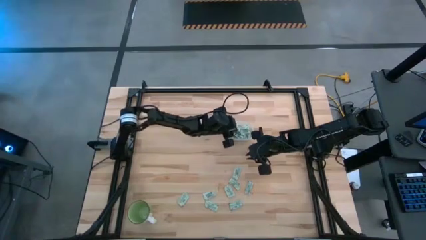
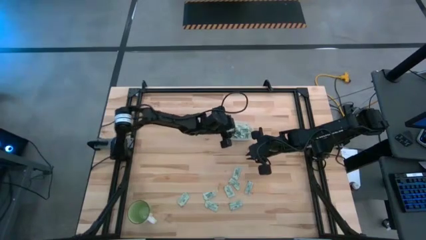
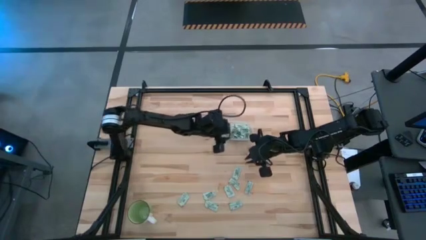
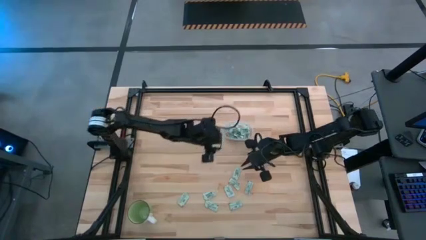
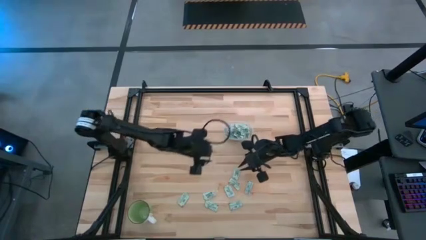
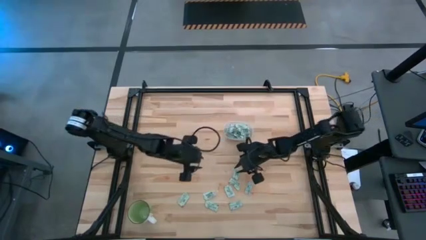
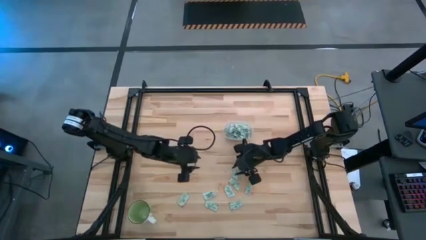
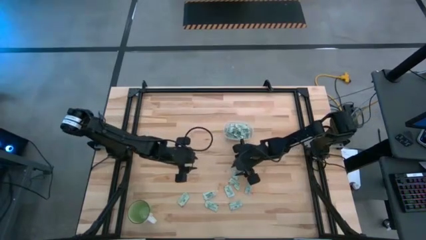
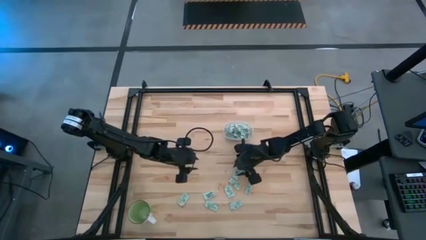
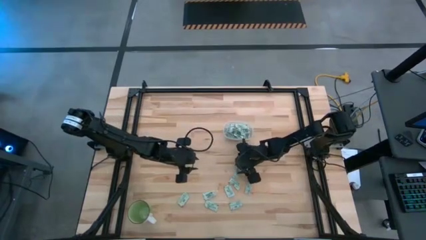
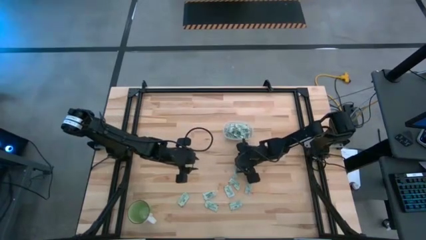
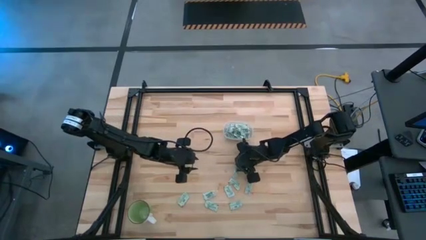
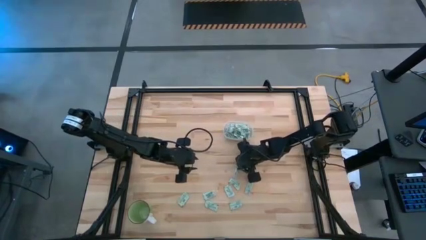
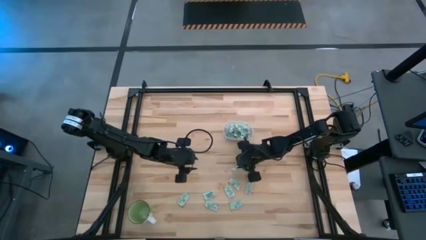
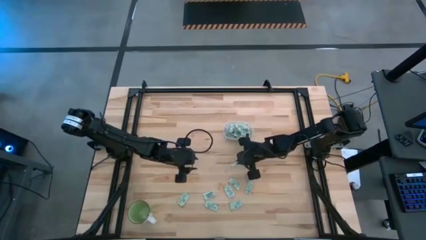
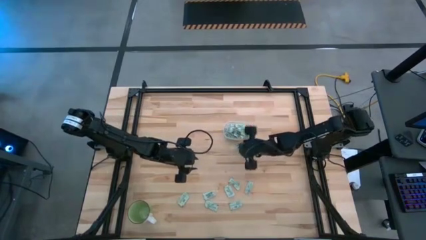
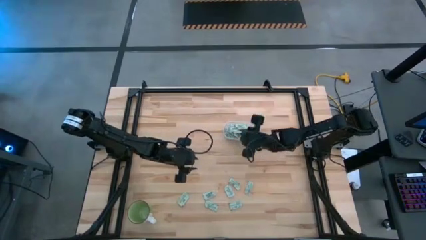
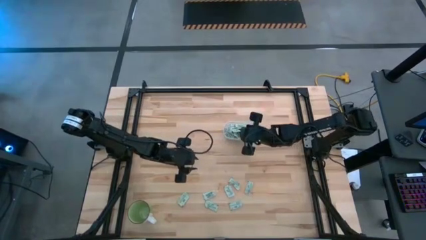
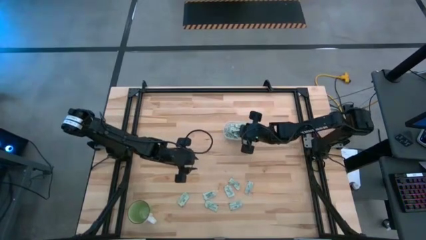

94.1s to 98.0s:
Task: Pick and place Stevia / Truvia into bins
Put the stevia packet into the transparent bin

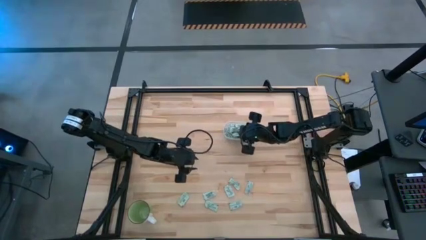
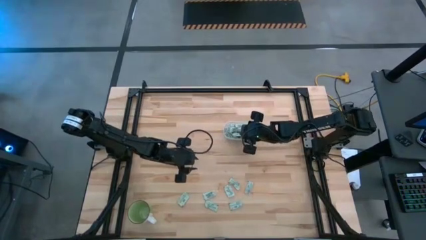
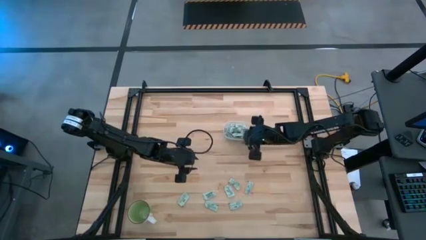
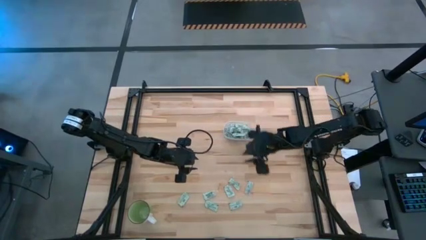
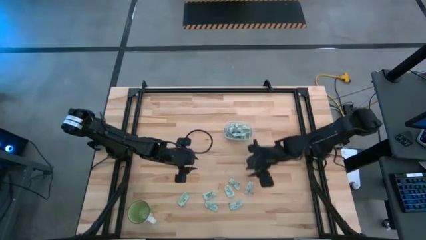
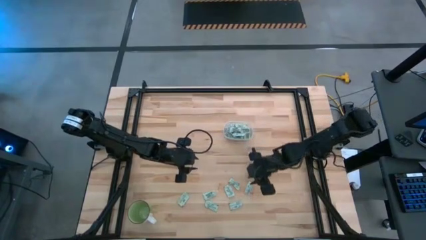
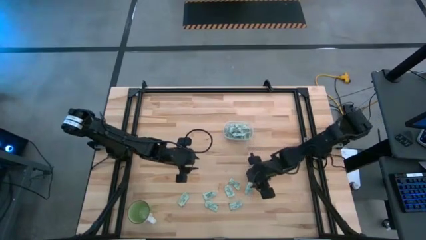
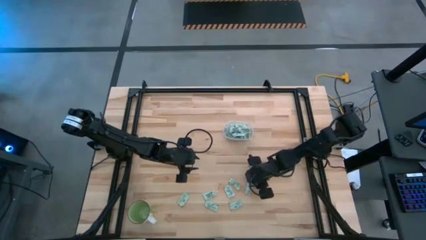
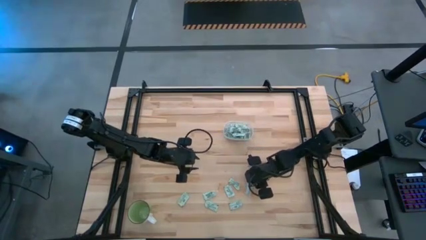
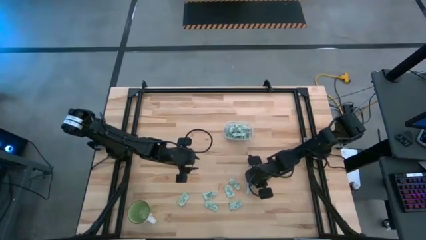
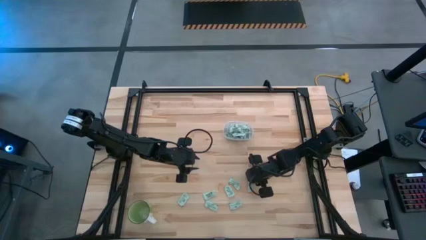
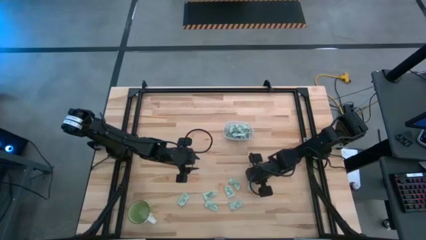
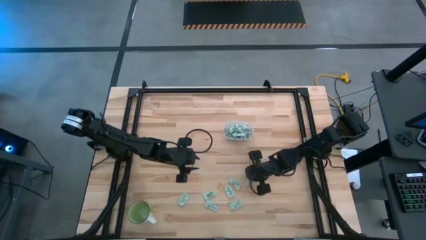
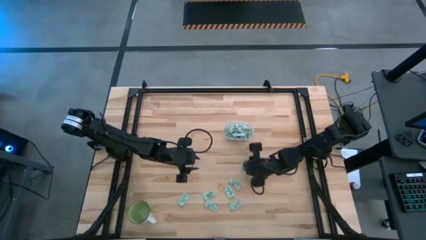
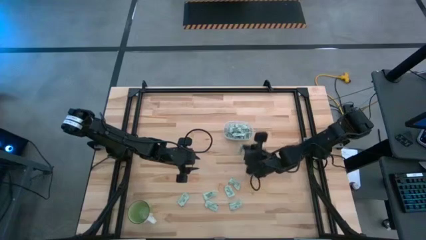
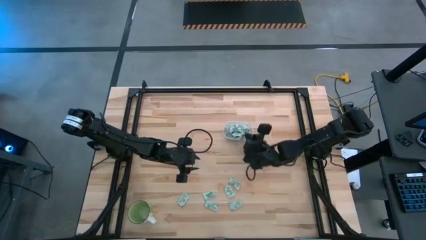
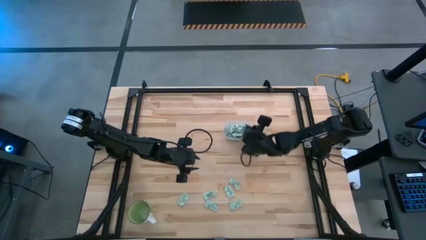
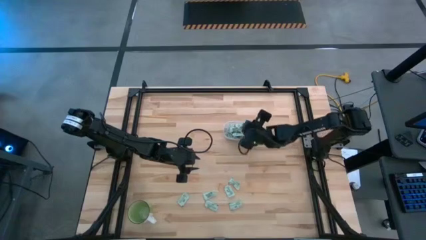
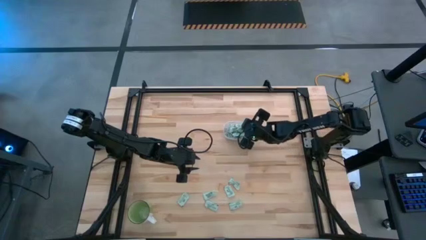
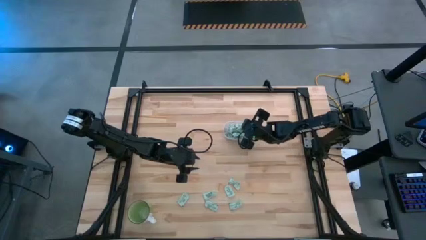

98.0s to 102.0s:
Put the stevia packet into the transparent bin

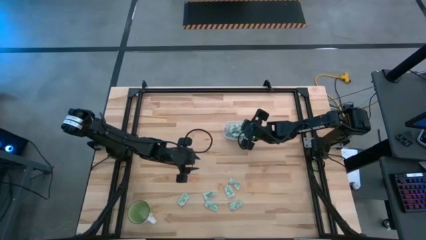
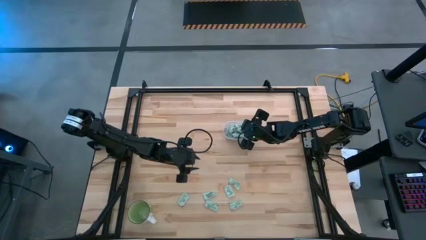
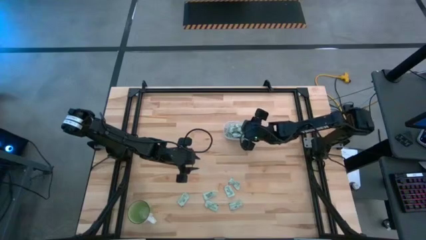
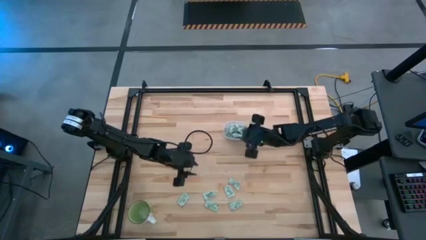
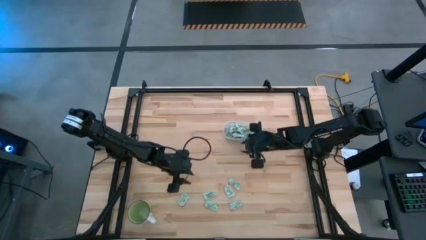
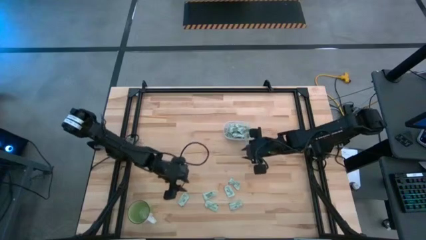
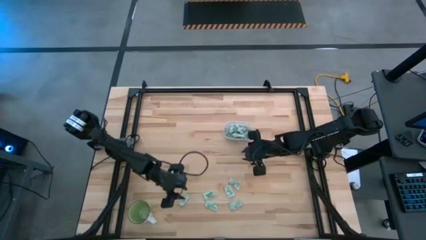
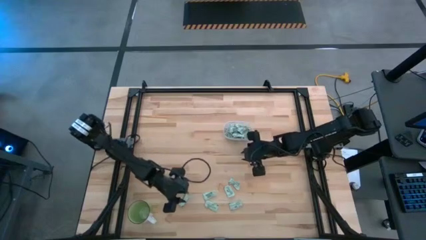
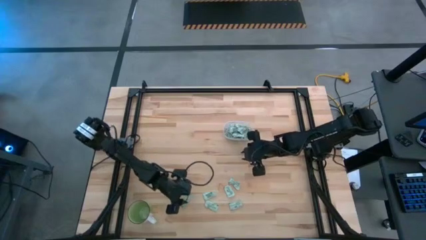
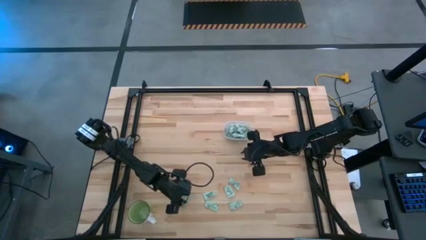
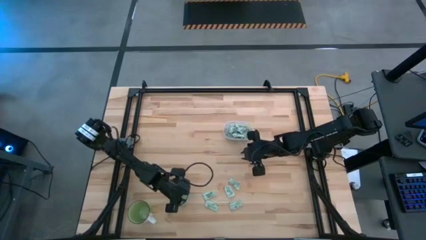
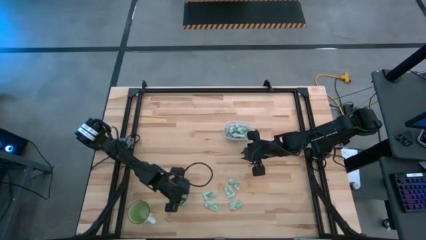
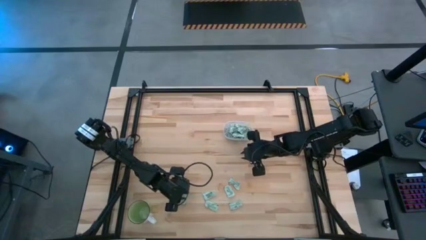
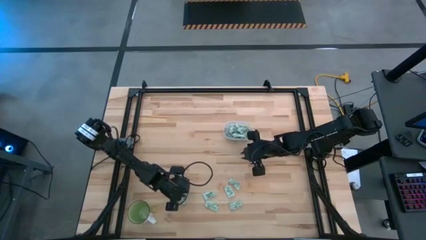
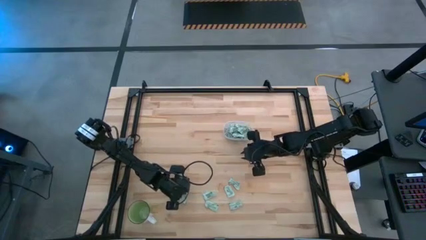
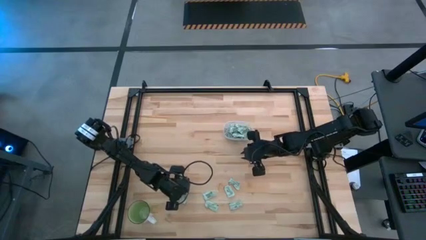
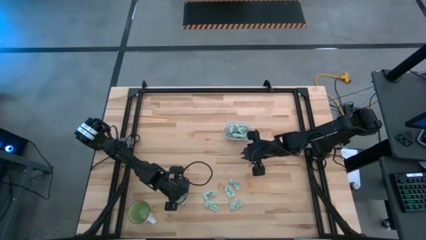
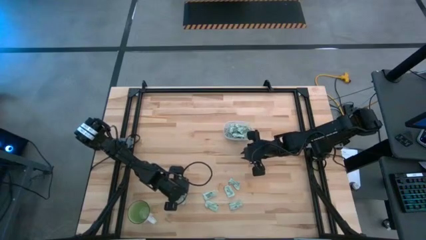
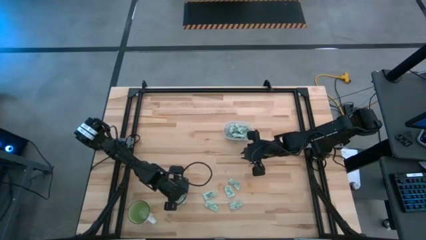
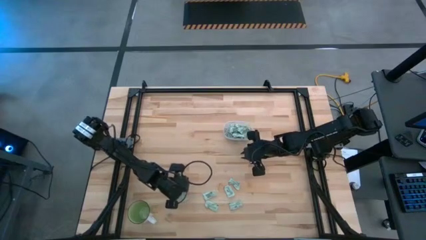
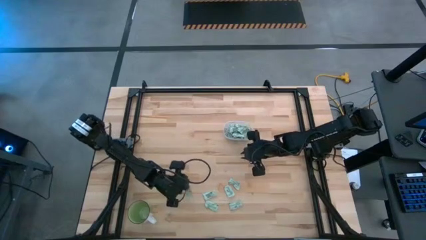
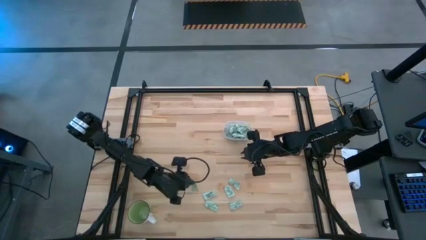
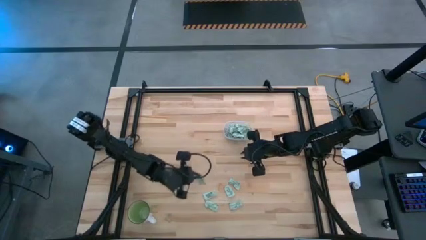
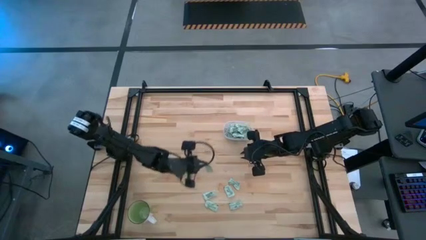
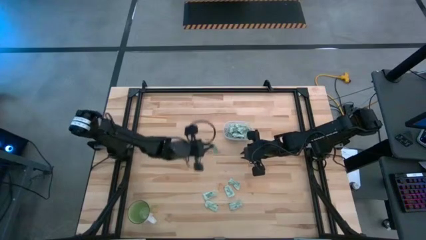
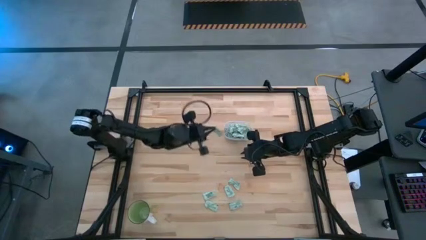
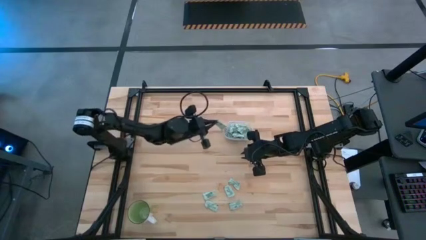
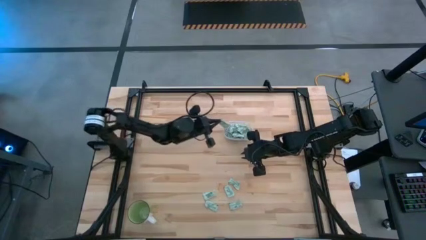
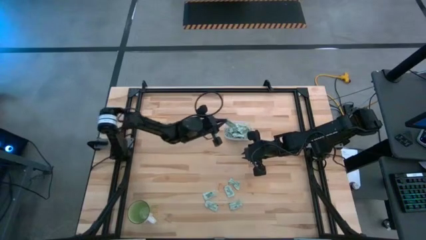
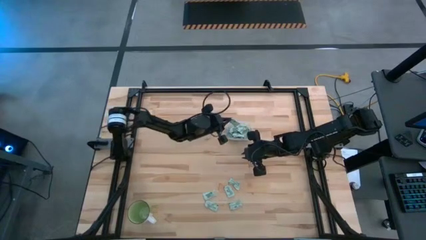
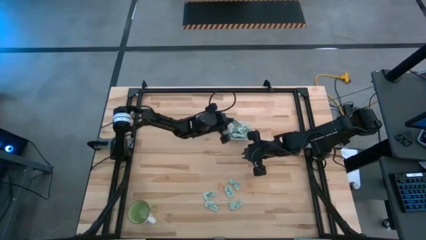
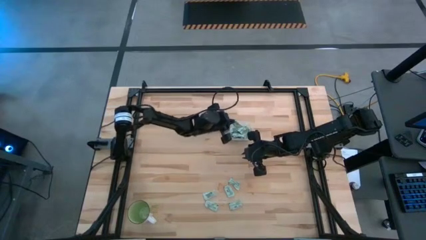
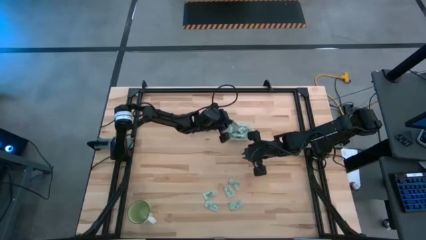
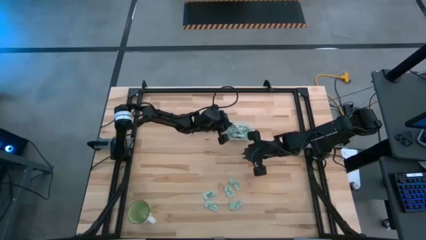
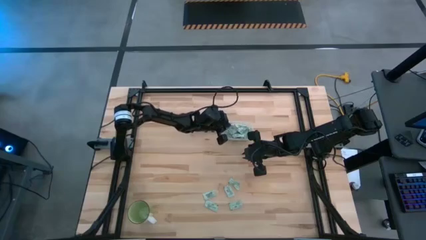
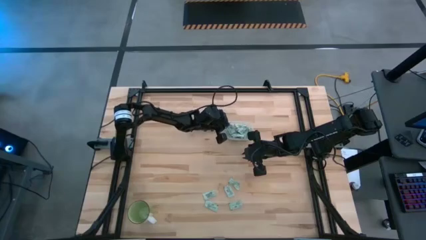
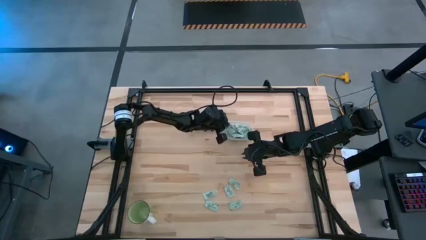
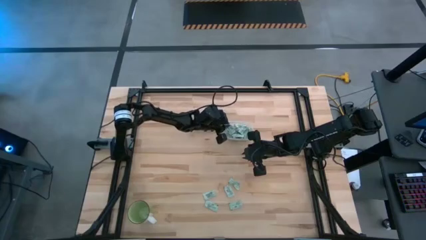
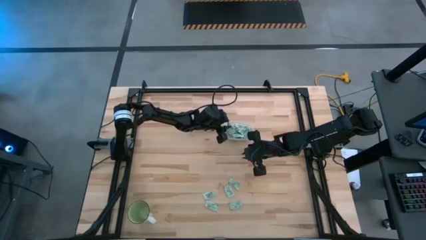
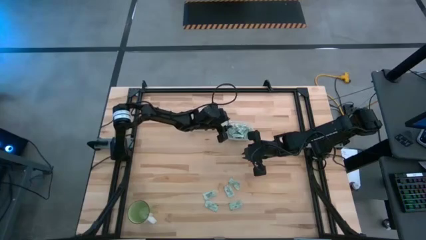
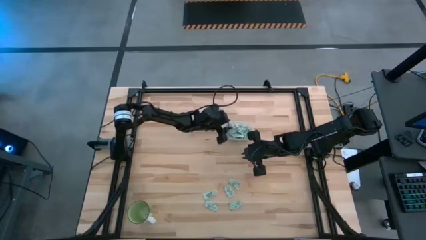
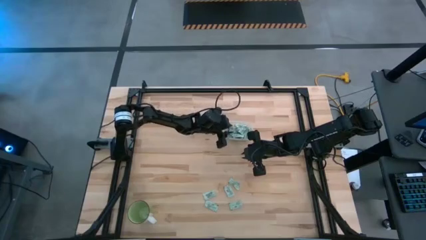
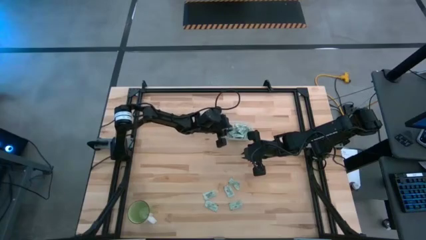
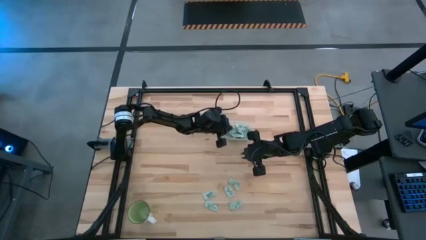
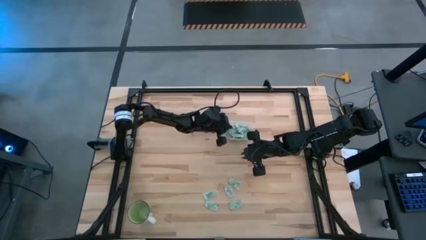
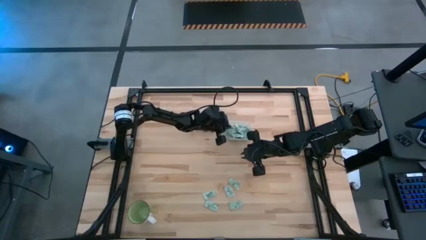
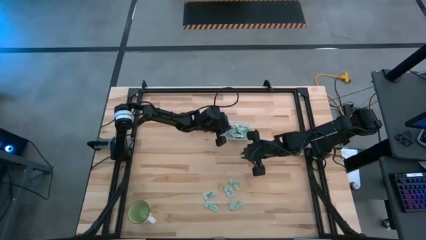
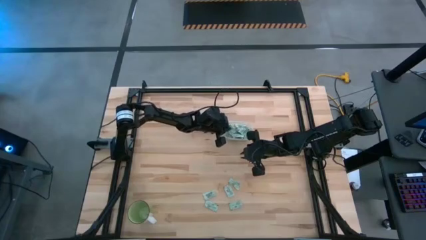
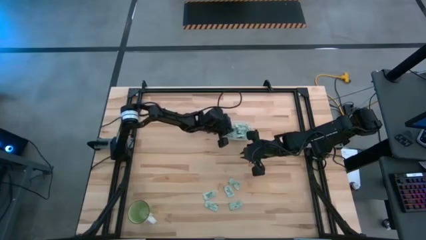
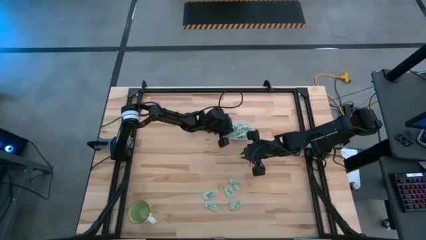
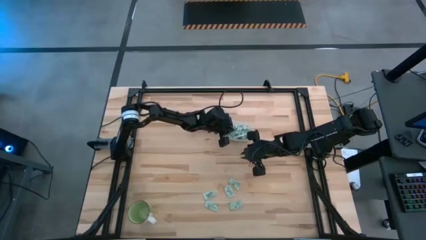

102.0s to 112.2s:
Put the stevia packet into the transparent bin
